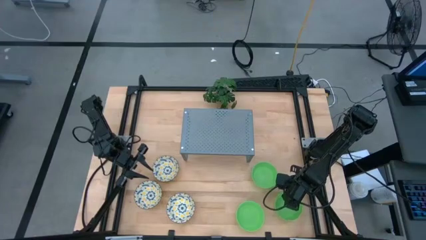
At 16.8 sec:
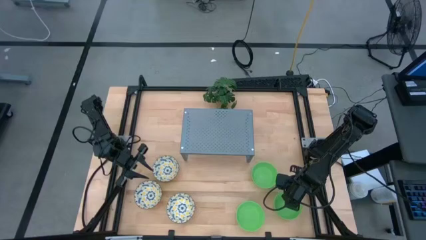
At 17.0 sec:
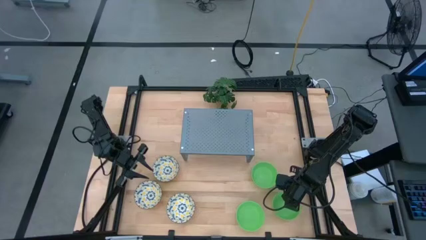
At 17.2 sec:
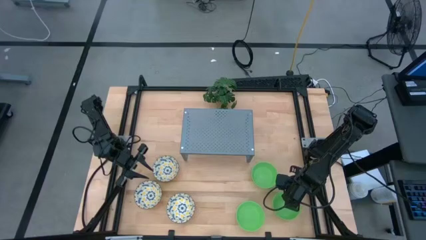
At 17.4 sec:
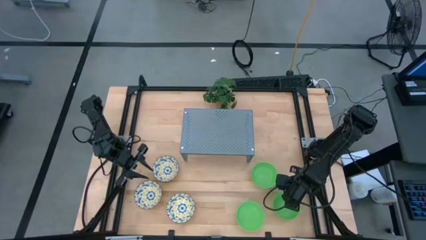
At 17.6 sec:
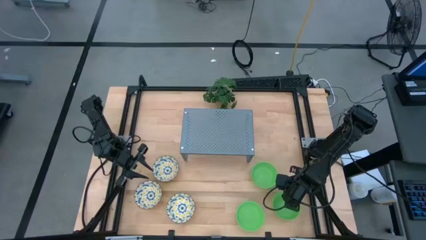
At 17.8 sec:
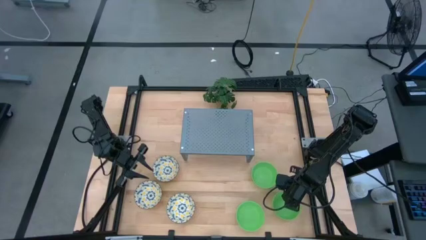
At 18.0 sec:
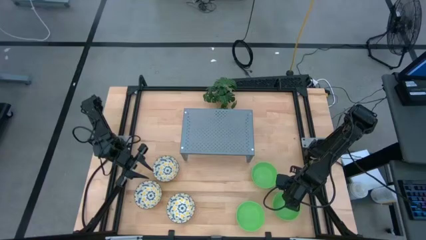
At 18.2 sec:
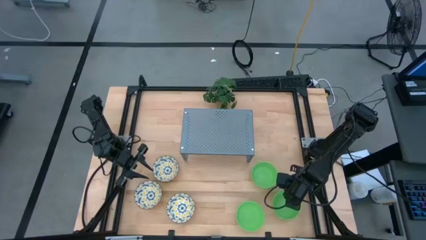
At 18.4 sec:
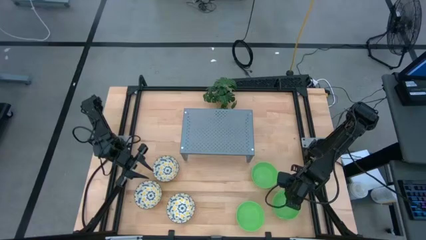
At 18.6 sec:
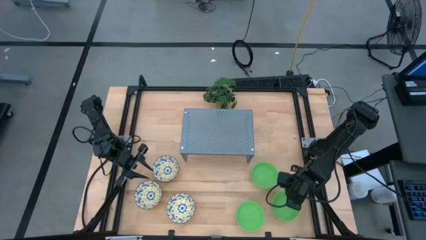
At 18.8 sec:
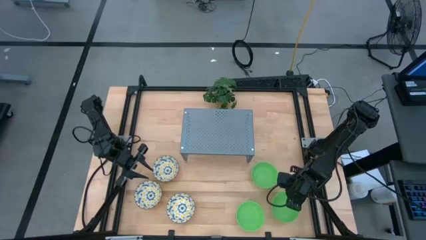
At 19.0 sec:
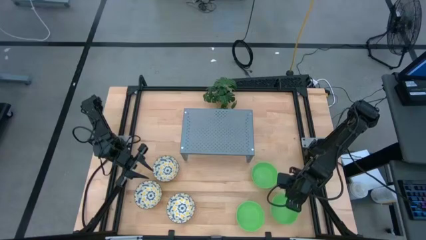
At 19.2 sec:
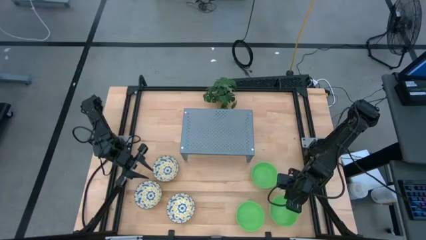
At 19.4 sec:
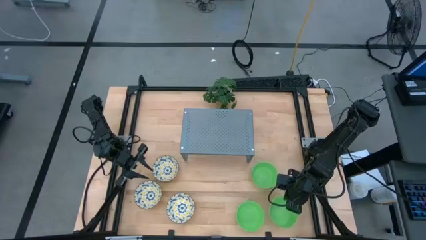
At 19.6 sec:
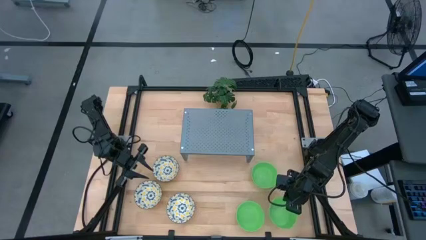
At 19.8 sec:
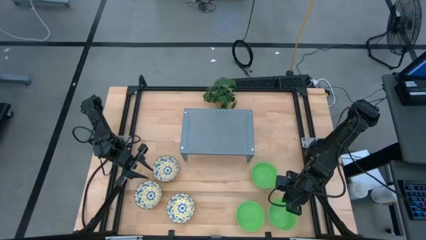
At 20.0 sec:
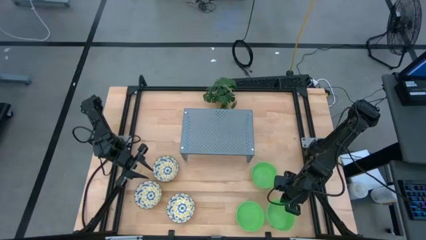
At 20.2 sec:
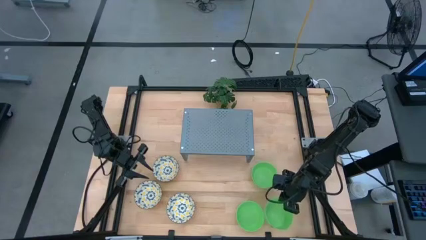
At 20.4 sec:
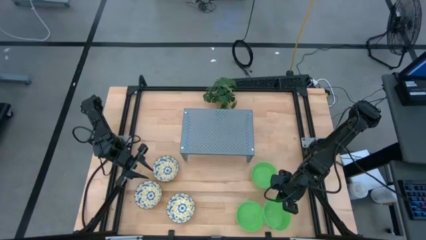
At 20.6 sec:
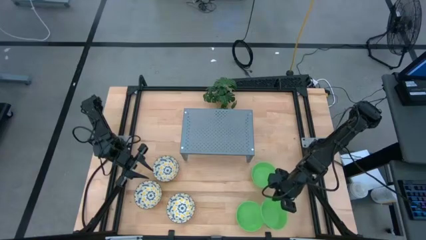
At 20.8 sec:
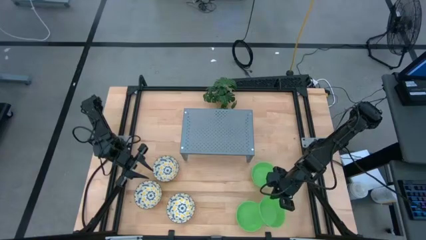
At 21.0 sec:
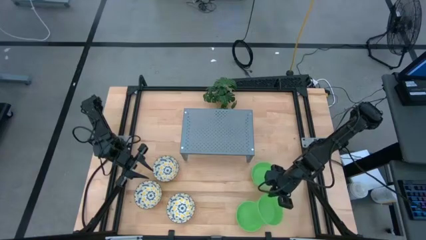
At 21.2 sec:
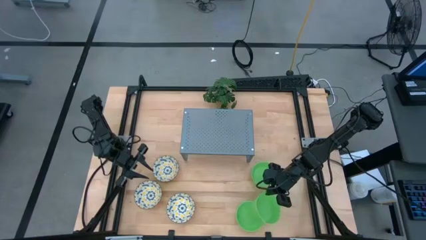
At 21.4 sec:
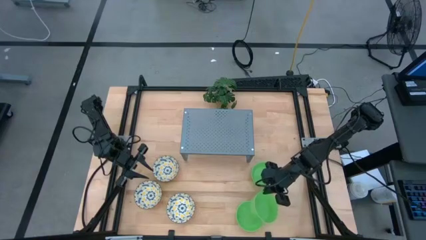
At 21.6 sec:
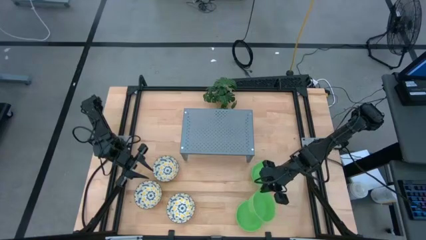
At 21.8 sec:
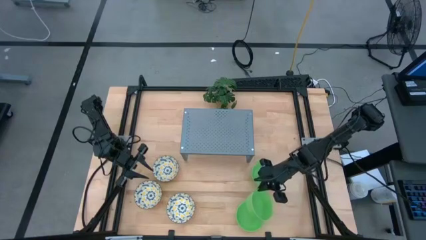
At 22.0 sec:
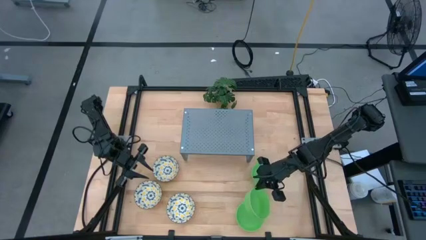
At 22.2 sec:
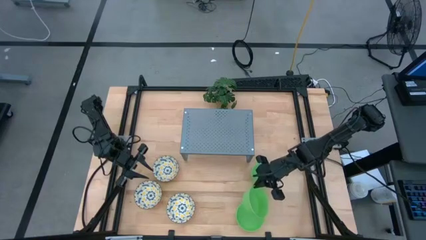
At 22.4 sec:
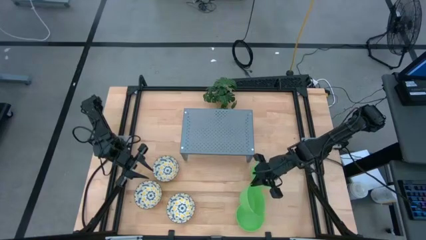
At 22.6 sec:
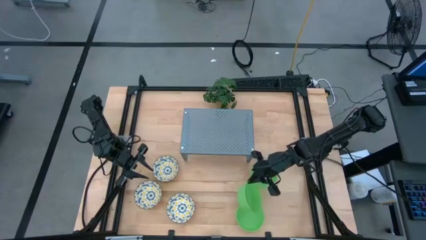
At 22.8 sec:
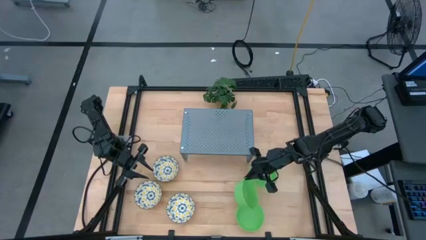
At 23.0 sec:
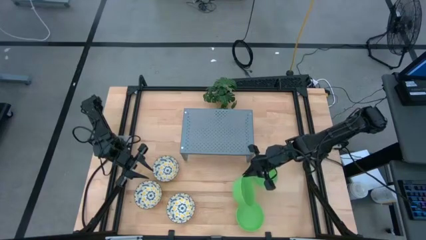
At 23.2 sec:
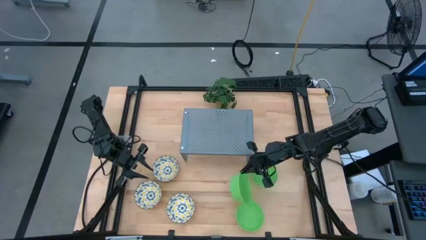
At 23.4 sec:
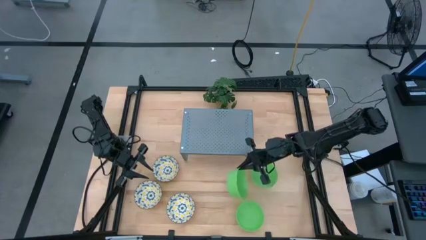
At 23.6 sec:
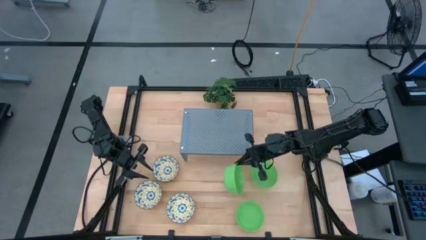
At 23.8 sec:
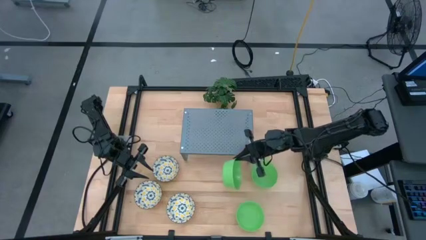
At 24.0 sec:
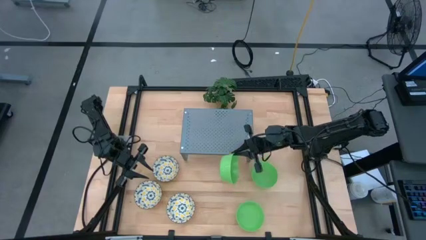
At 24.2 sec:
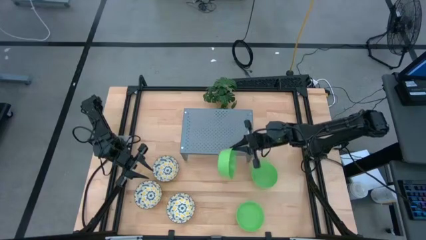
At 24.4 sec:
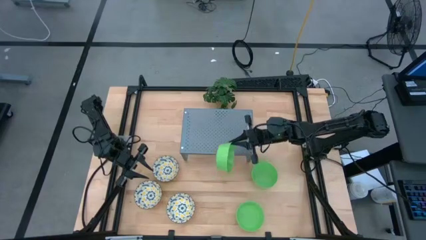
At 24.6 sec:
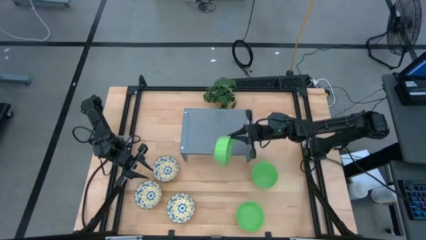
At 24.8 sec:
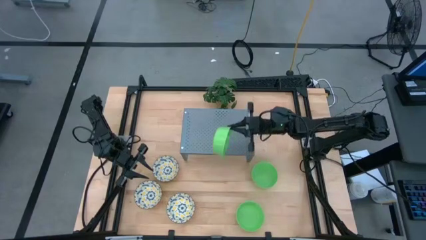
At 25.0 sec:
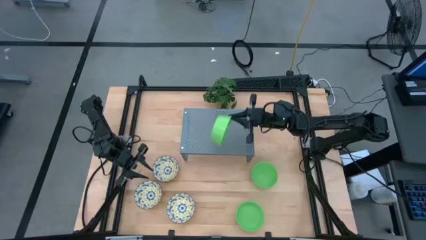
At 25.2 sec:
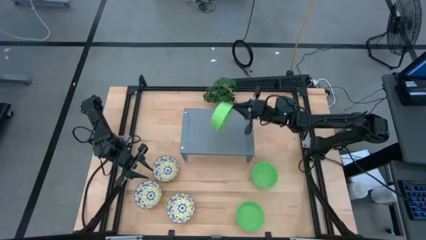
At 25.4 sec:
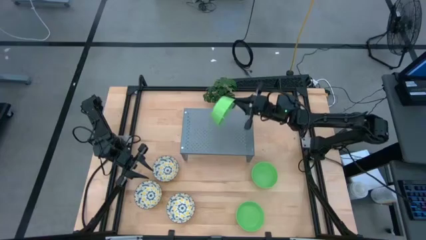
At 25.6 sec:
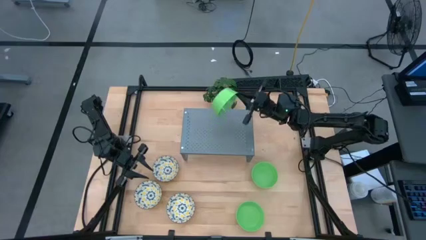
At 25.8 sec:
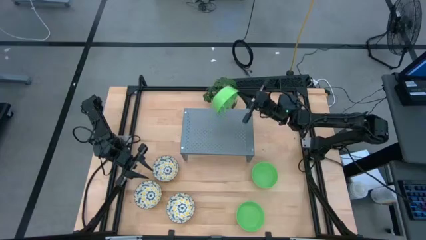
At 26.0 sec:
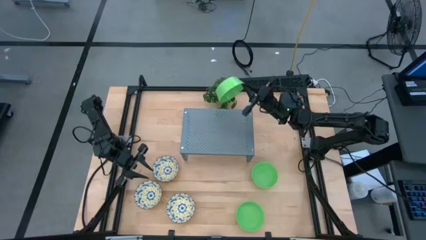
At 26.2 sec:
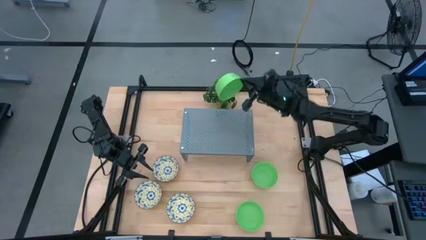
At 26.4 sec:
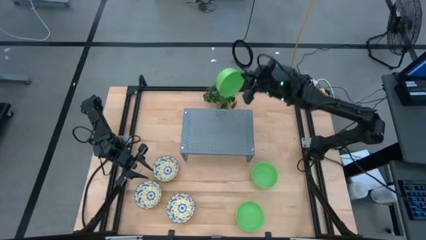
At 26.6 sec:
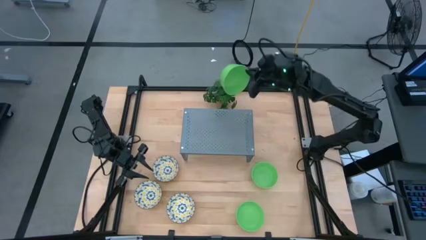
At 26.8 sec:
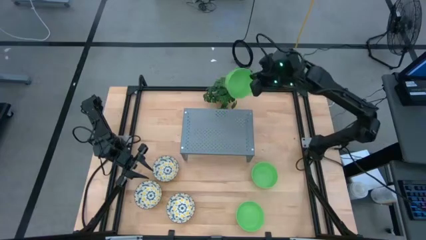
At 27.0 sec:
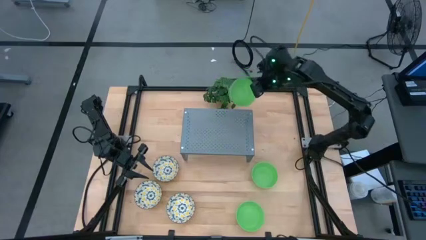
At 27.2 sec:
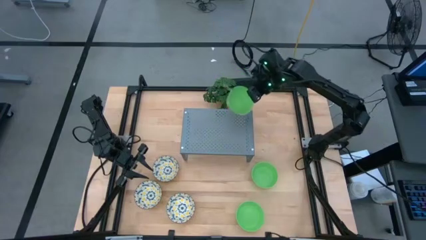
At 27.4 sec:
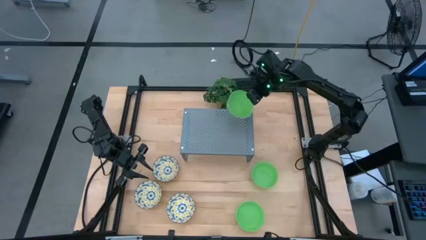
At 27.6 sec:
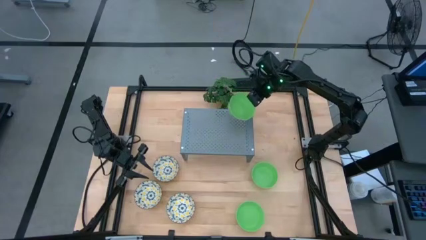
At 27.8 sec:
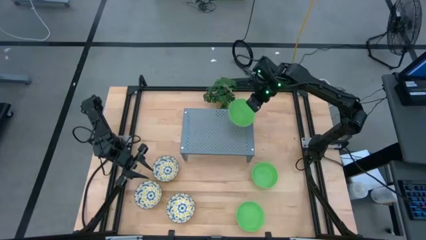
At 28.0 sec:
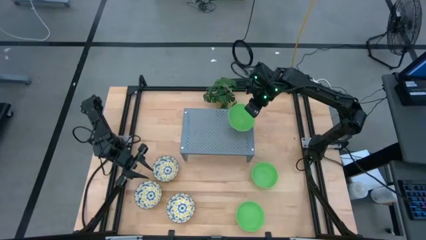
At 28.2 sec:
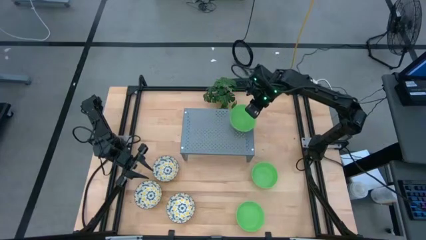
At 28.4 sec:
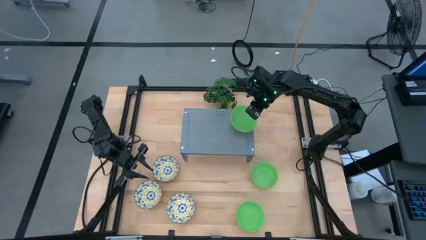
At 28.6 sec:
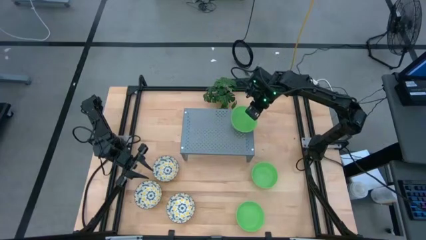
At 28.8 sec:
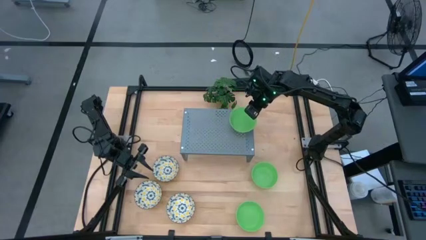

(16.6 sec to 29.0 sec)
Task: Pick & Place Mini bowls
Put the bottom right green bowl on the shelf

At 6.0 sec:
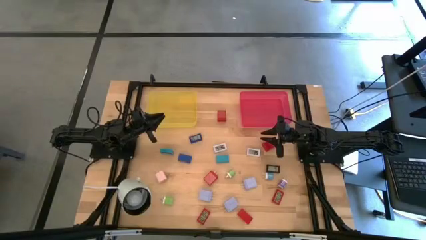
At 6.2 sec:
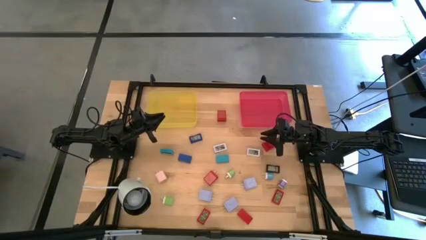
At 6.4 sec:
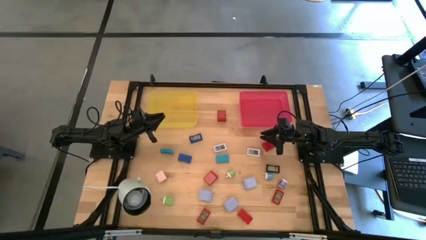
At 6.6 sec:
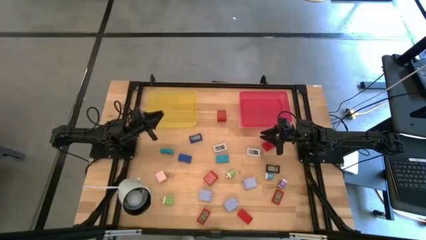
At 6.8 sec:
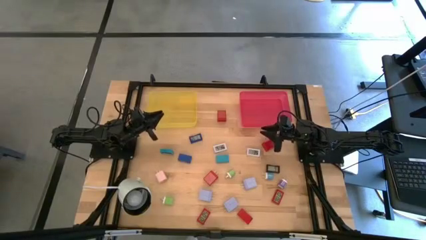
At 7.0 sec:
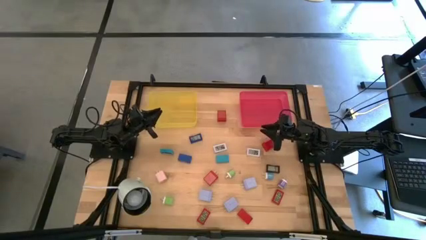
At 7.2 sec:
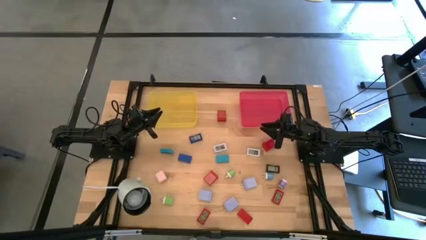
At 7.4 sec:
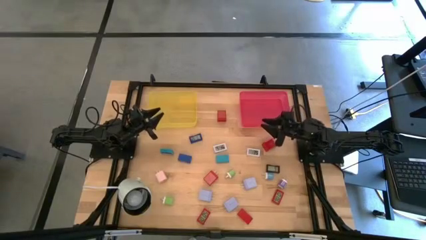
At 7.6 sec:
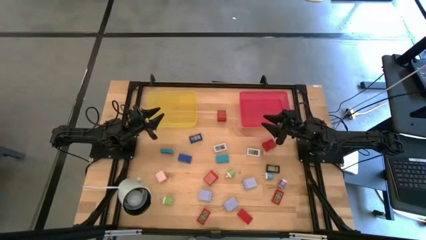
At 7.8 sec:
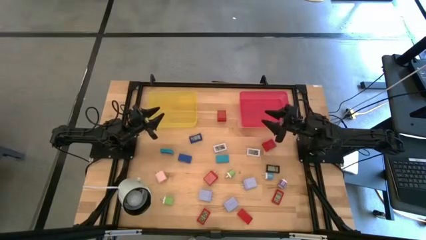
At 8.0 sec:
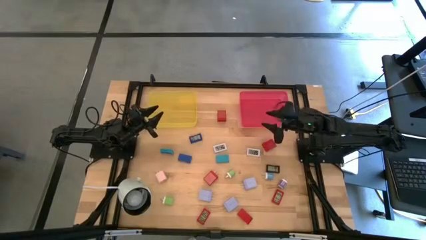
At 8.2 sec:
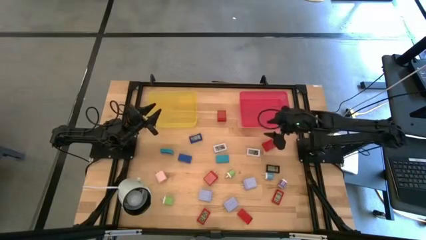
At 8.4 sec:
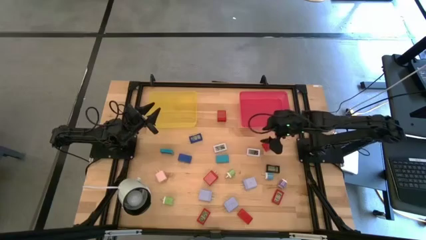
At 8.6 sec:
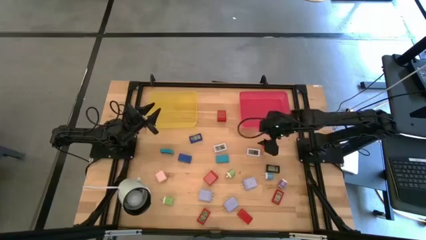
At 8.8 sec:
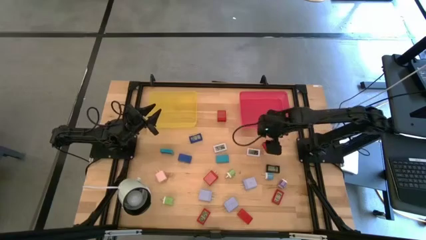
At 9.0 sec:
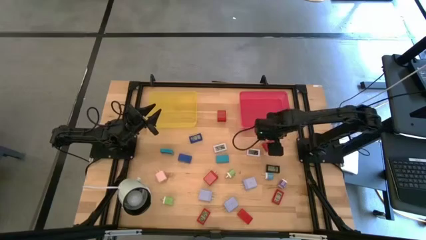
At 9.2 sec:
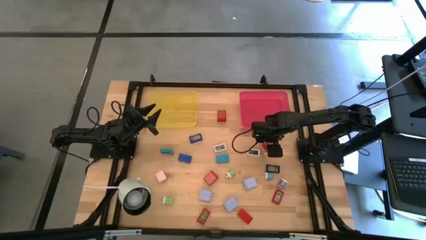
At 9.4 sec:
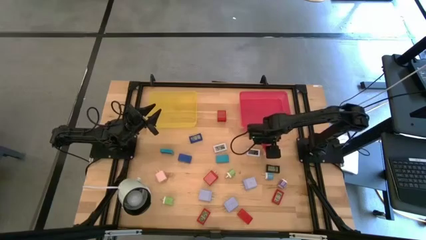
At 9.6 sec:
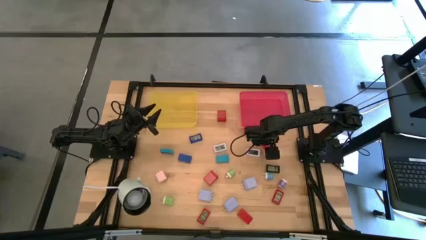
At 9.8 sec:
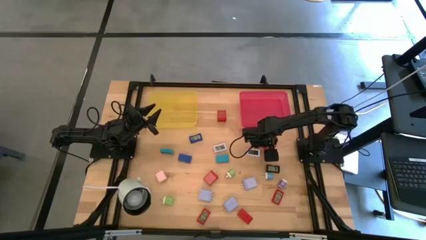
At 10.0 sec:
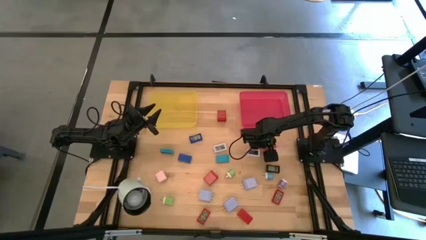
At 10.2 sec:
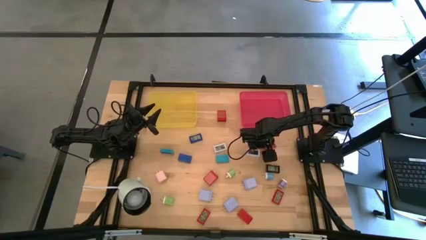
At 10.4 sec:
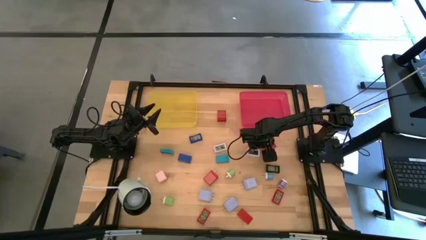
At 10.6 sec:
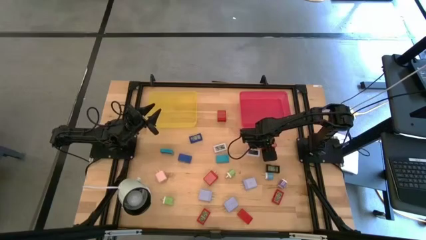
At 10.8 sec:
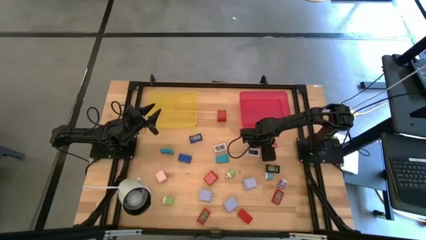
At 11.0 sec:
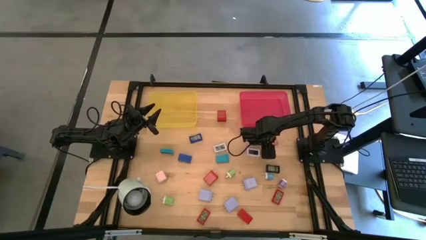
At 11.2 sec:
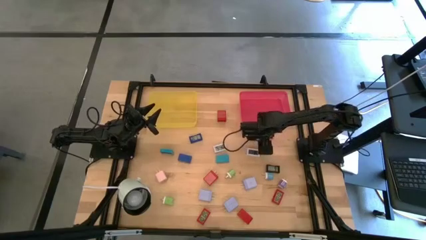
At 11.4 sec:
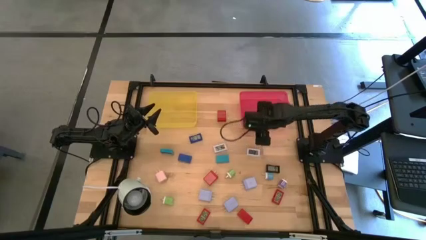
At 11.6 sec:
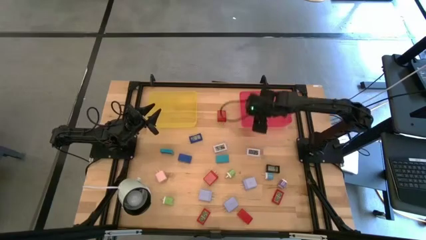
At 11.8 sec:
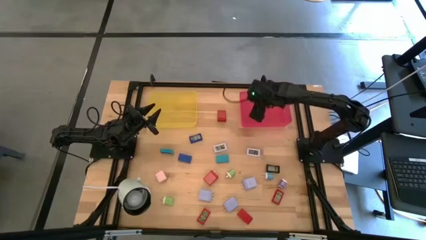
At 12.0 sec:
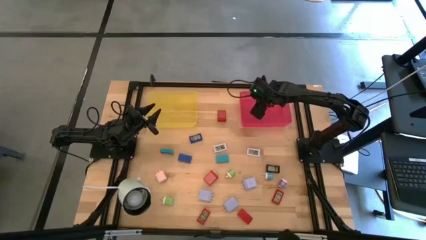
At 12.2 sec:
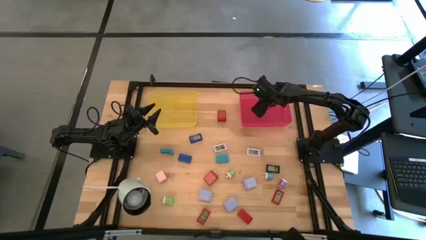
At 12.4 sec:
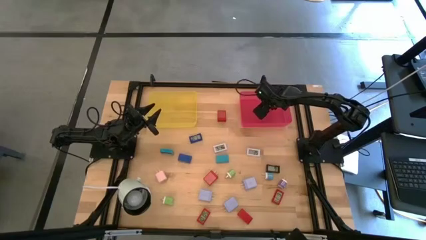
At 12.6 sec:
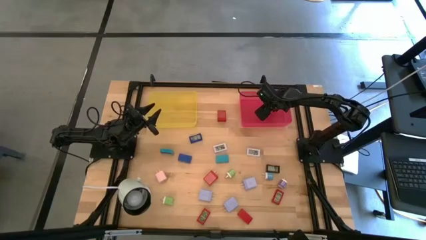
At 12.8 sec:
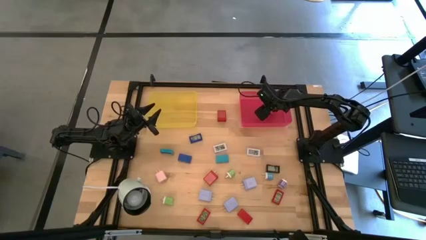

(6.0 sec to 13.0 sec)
Task: Pick & Place Office items
Put the right red charger adapter into the red bin
